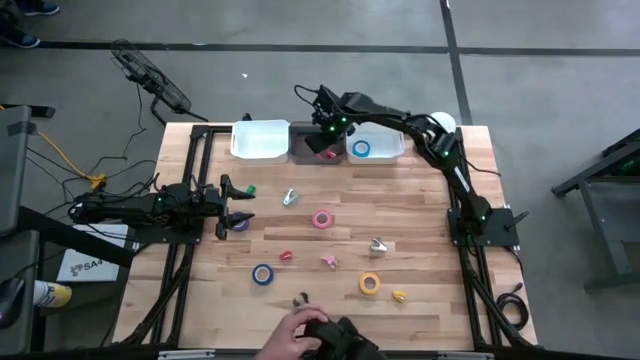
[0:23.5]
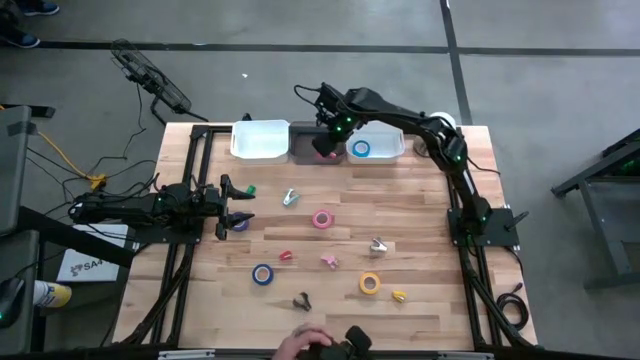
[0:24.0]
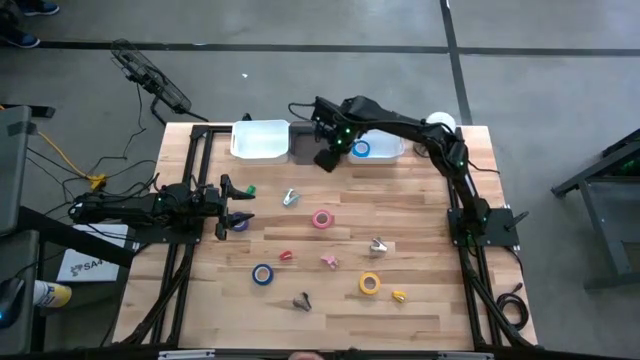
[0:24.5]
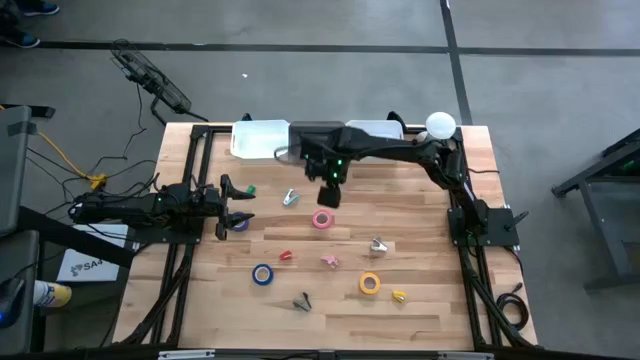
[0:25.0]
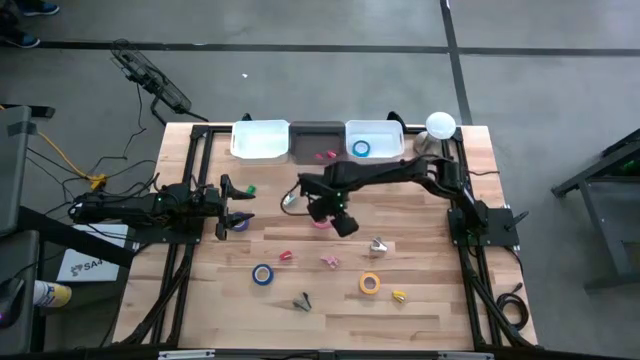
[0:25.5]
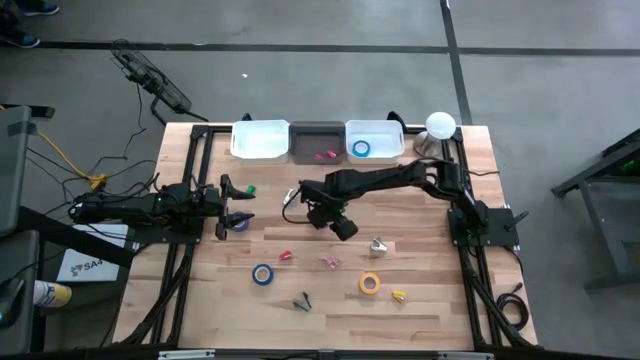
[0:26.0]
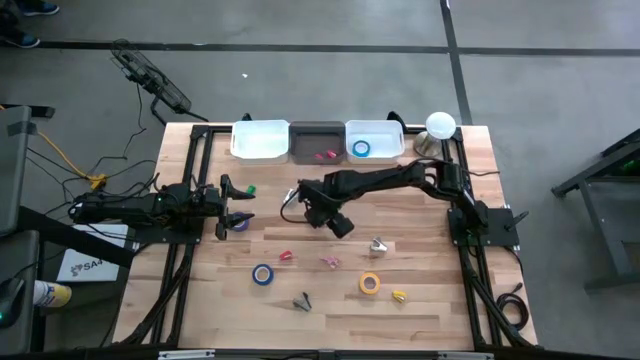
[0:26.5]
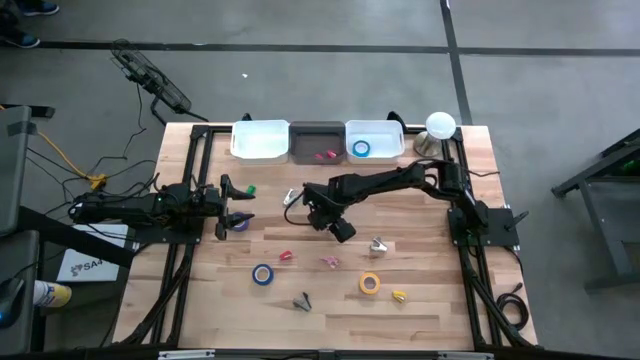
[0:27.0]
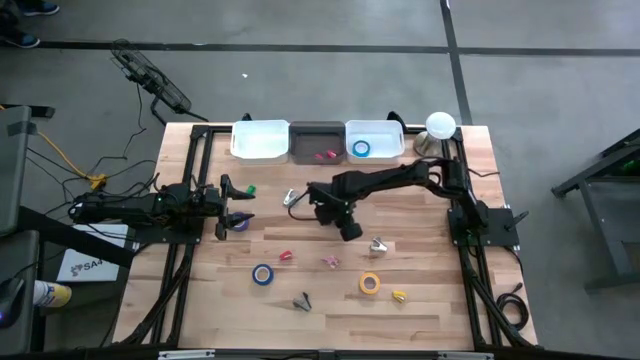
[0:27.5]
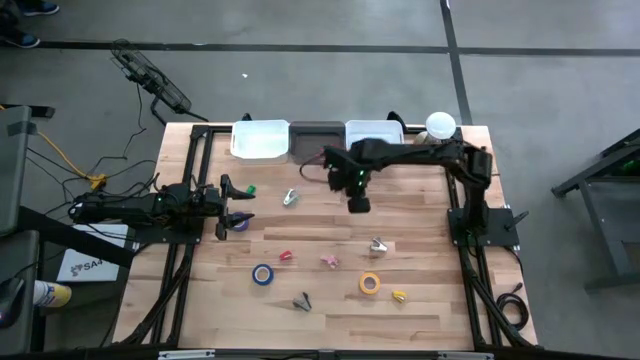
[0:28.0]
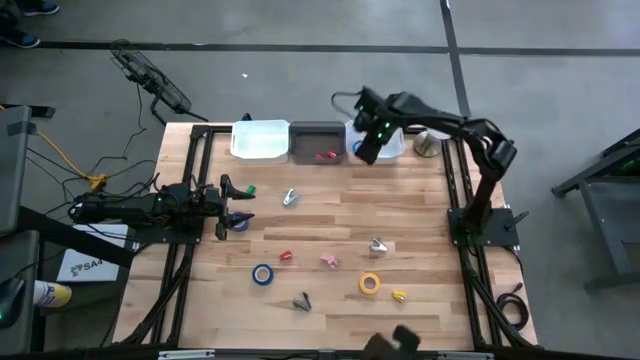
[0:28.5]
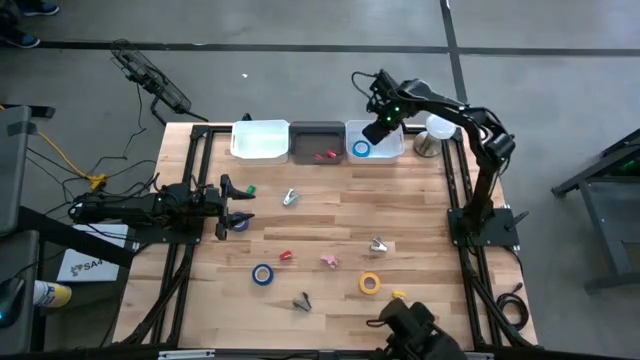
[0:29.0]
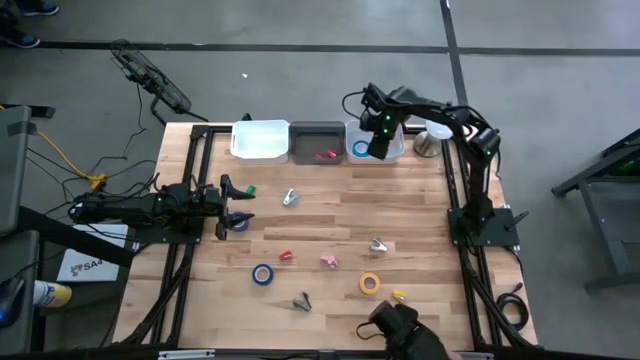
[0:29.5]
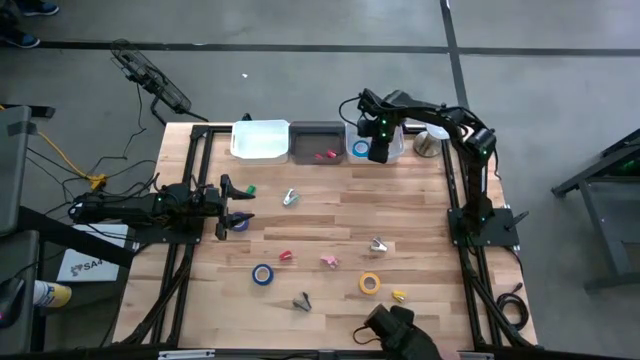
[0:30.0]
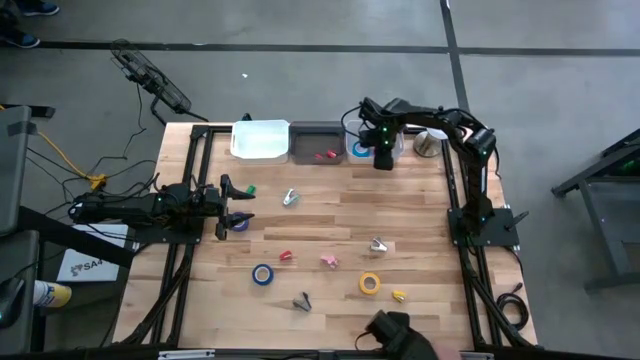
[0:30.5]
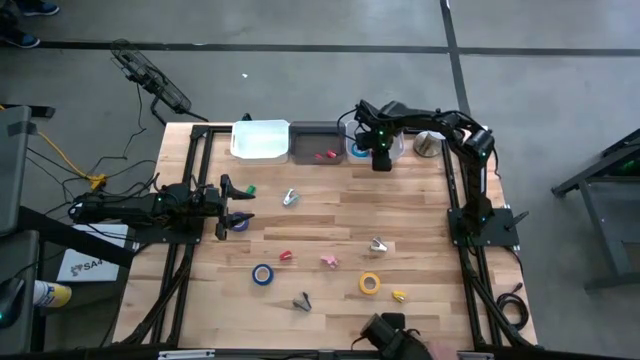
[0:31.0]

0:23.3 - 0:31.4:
Task: Pick and place Stapler, Stapler remover, tape
Put the pink tape into the right white bin

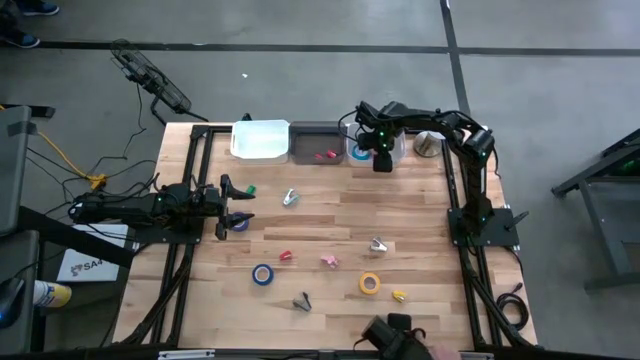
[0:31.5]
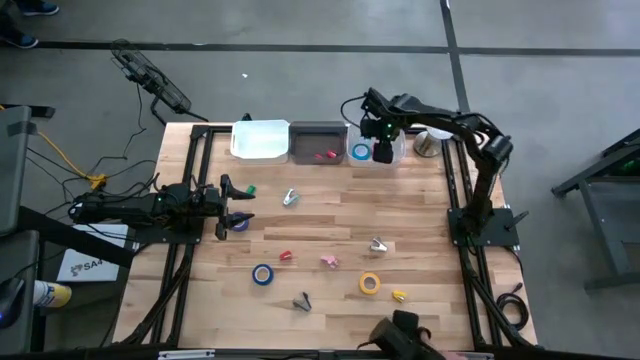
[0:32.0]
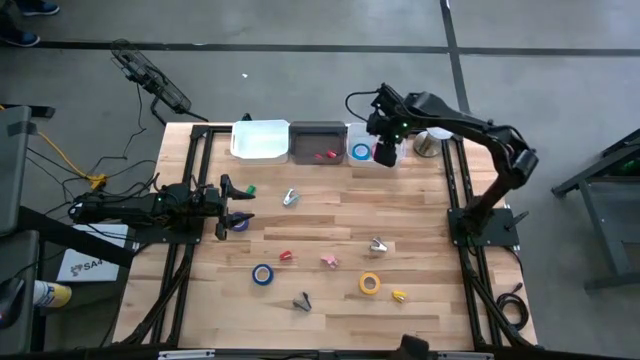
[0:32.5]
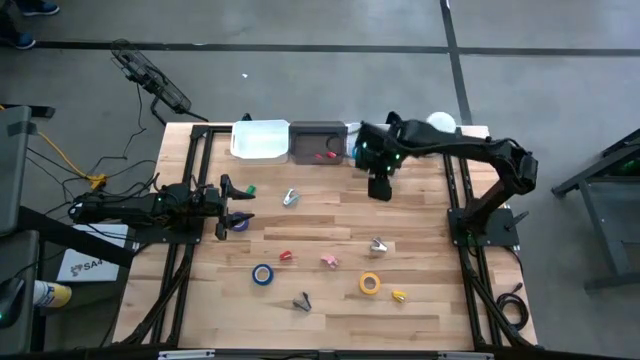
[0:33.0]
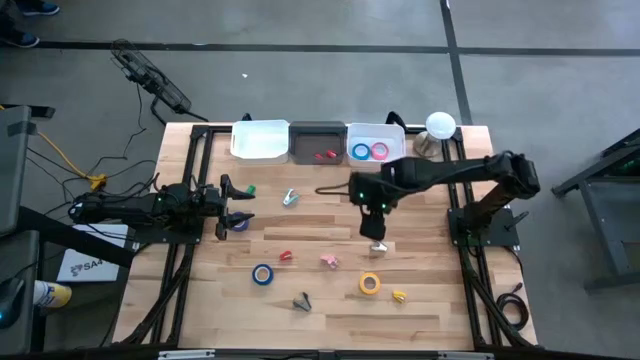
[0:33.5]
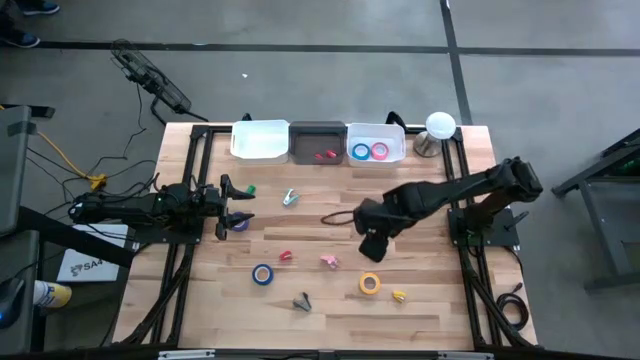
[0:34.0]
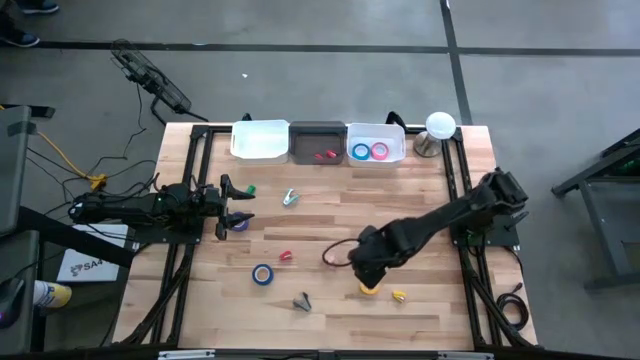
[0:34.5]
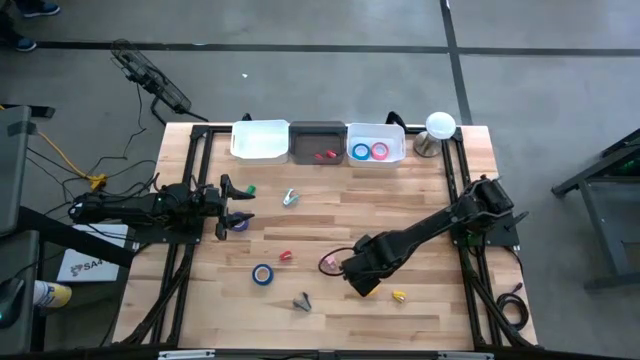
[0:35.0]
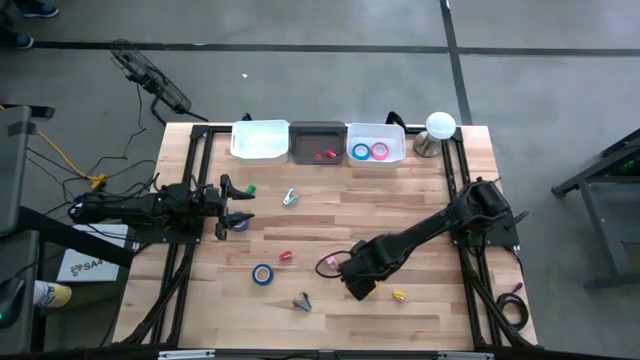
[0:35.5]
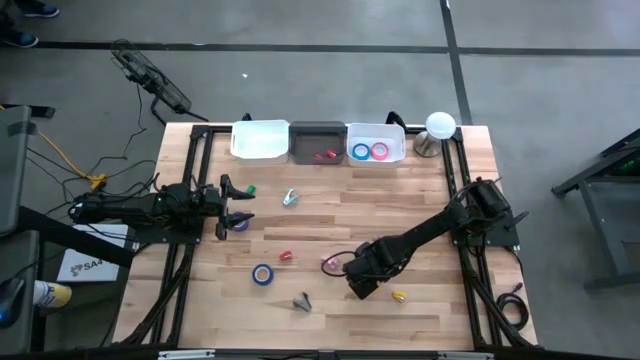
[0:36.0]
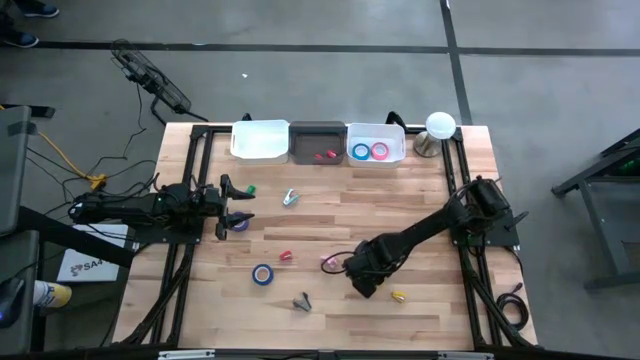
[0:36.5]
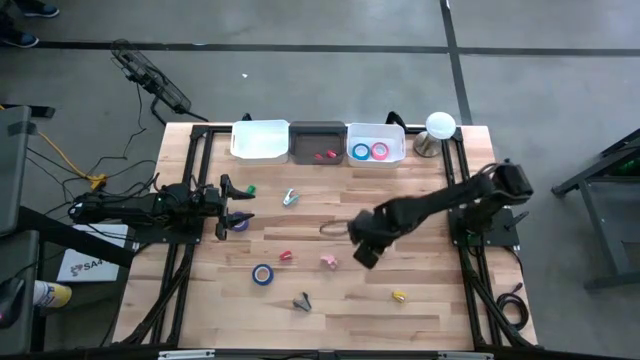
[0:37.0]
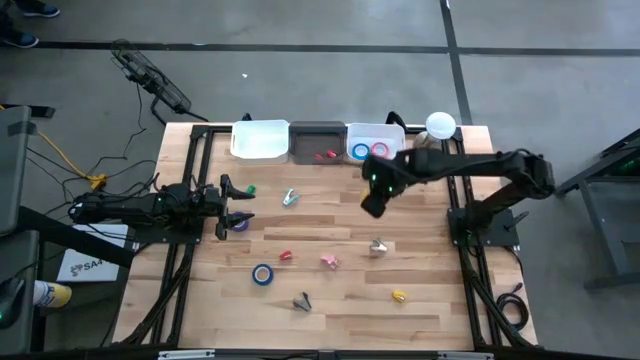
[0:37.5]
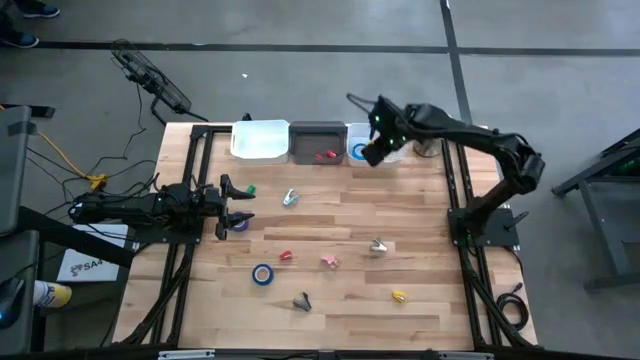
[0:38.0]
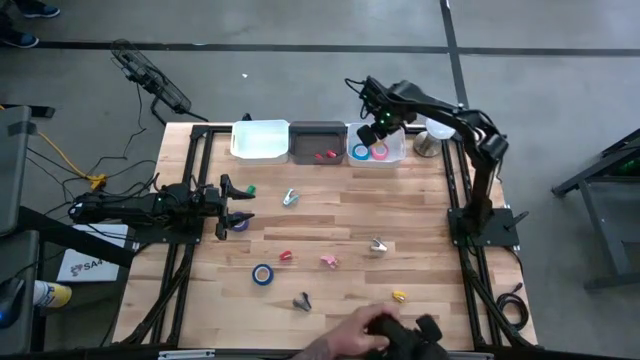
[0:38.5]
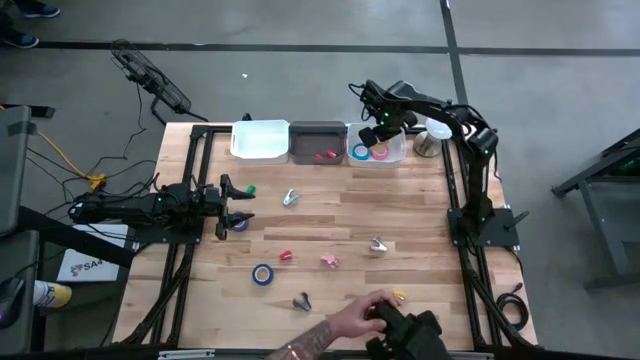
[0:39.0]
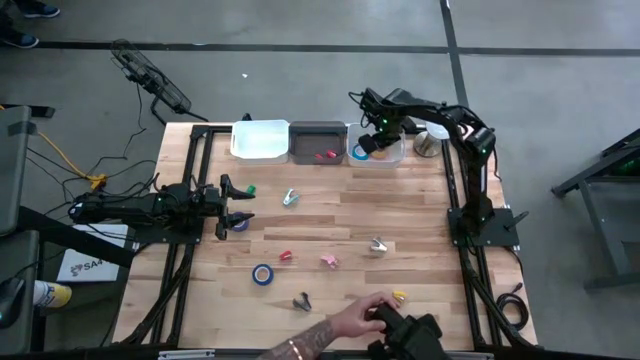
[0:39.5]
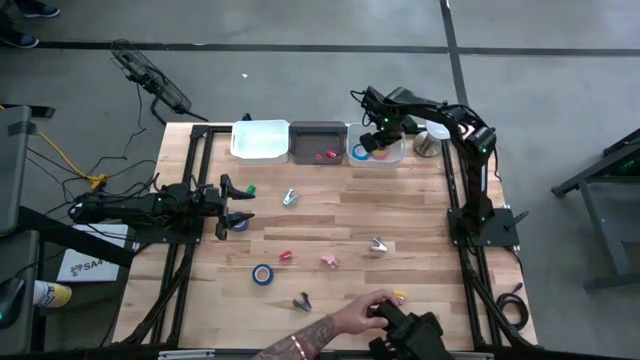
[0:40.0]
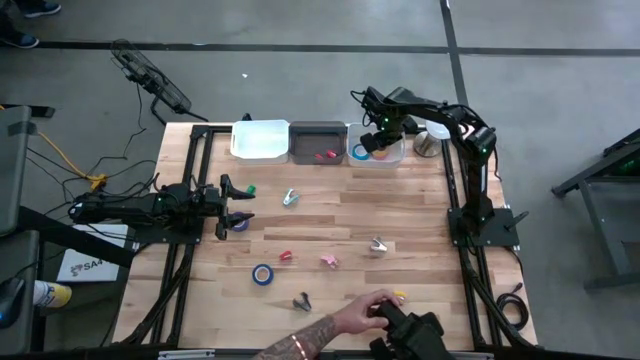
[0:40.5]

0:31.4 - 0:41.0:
Put the yellow tape into the right white bin

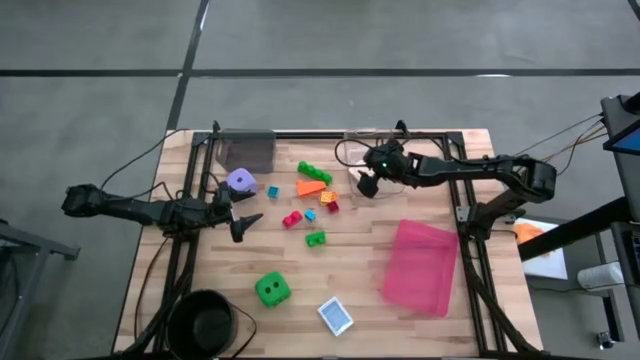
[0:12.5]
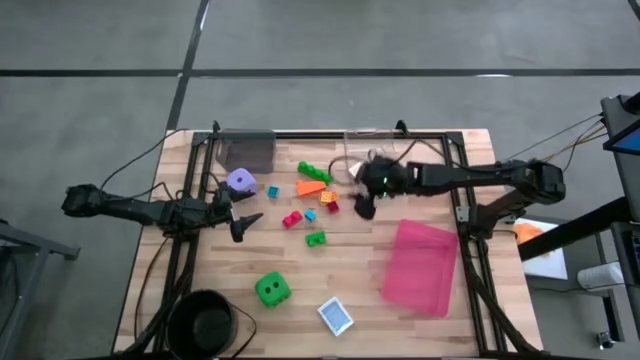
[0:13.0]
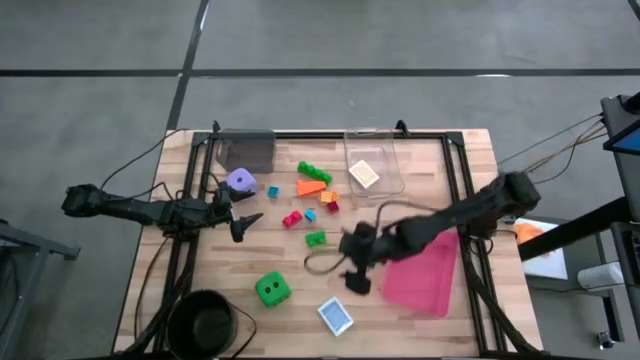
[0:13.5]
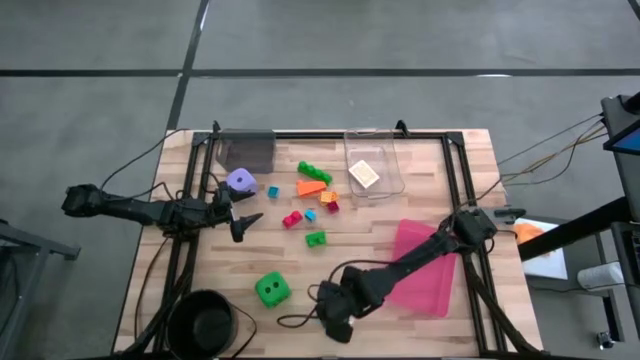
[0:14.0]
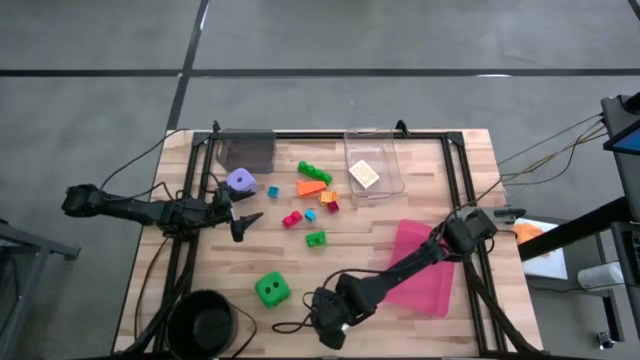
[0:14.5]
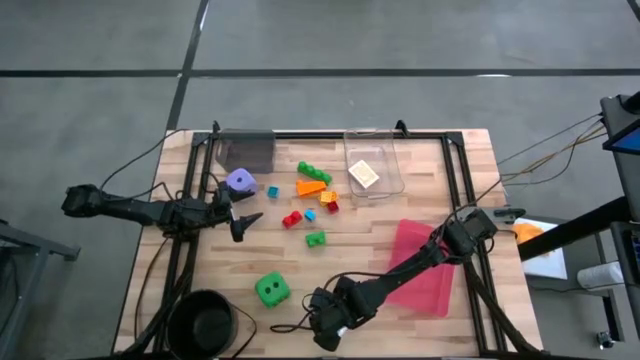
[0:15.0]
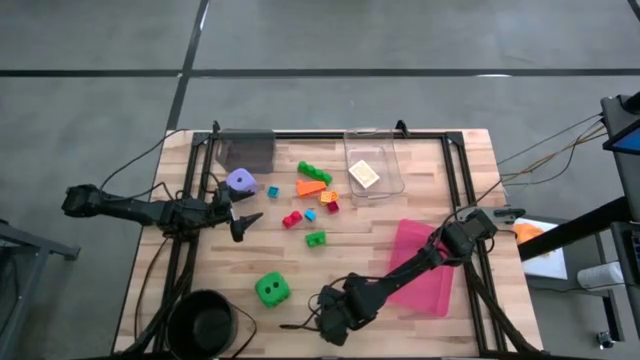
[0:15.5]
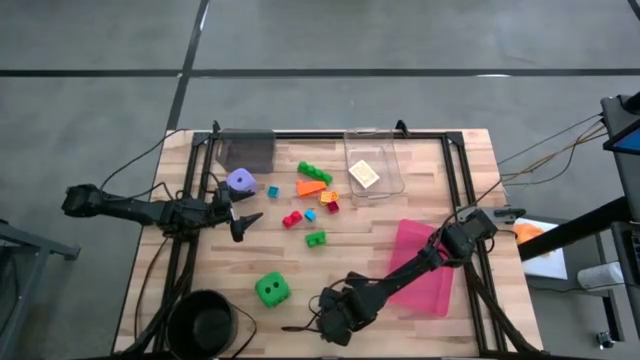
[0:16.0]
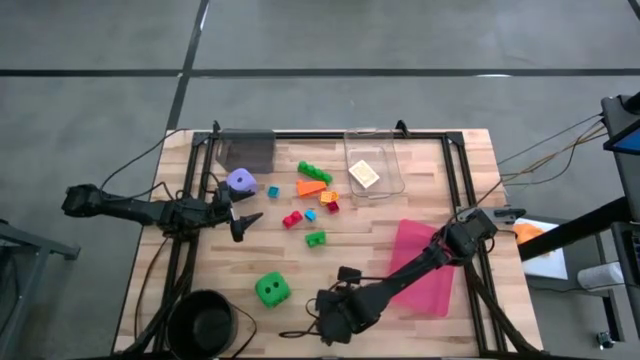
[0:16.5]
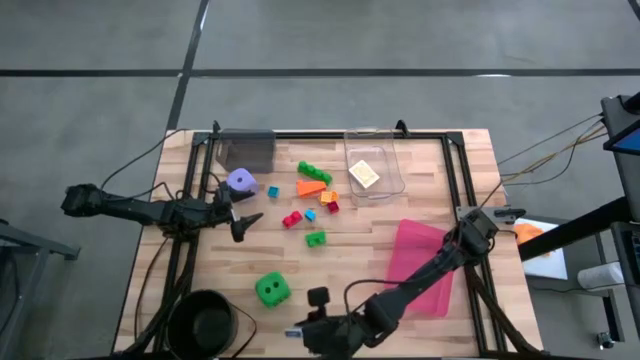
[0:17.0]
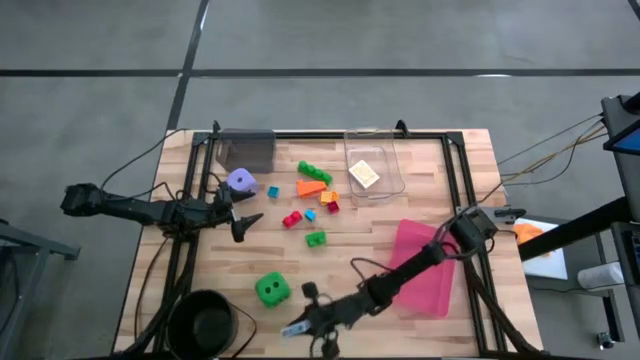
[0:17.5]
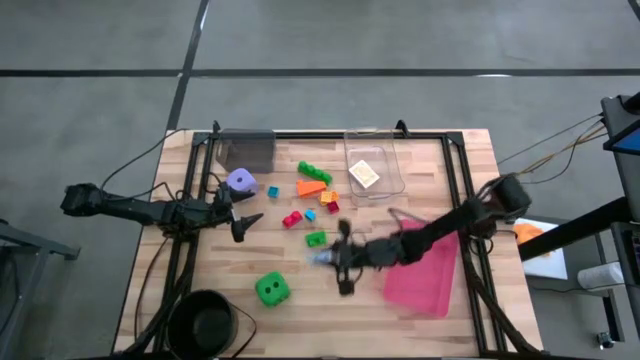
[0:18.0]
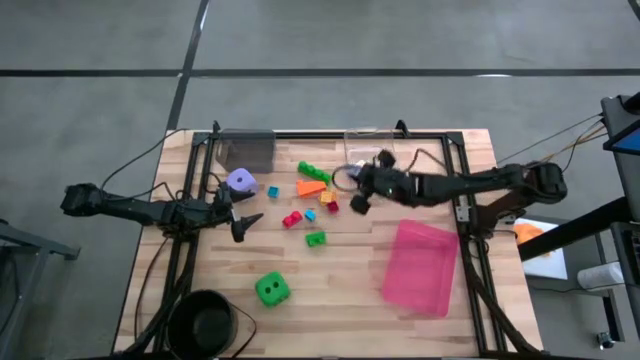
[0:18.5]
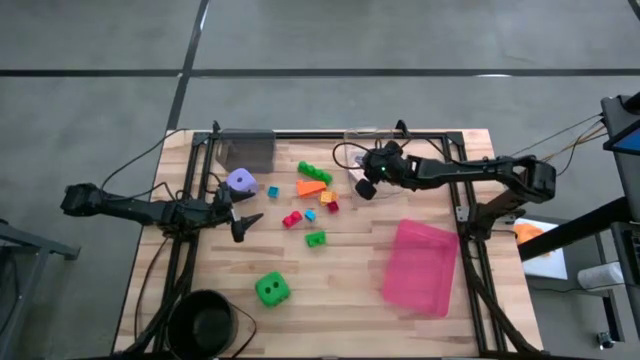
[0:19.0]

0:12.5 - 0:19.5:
Task: Pick & Place Toys
Put the blue deck of cards into the transparent bin
